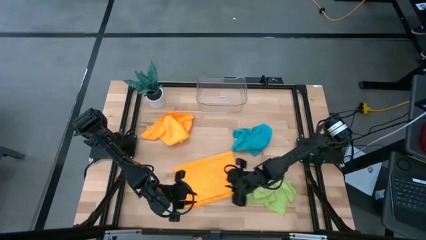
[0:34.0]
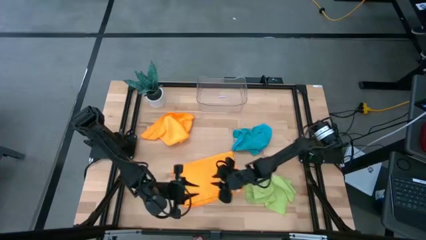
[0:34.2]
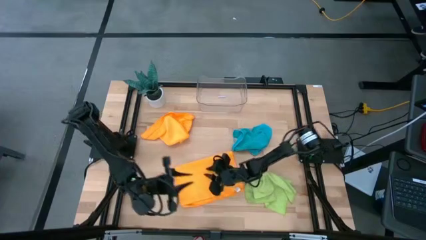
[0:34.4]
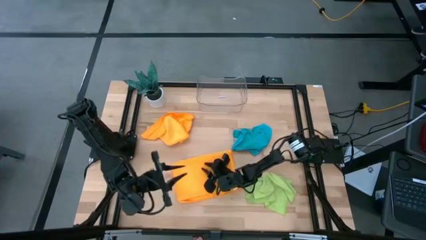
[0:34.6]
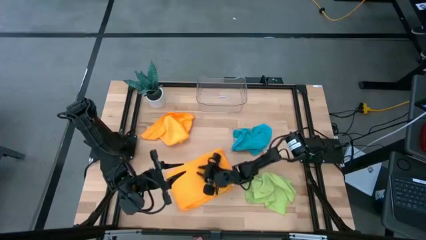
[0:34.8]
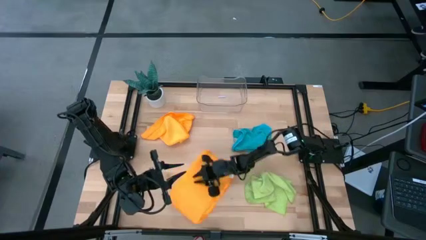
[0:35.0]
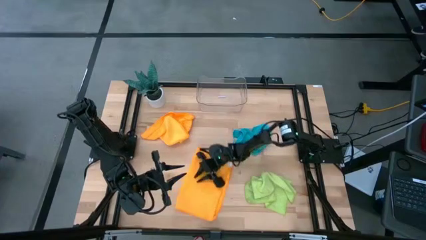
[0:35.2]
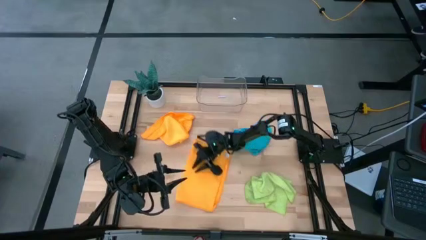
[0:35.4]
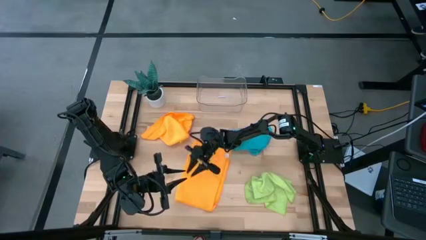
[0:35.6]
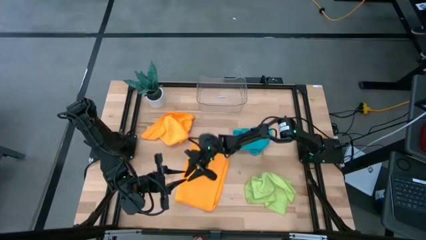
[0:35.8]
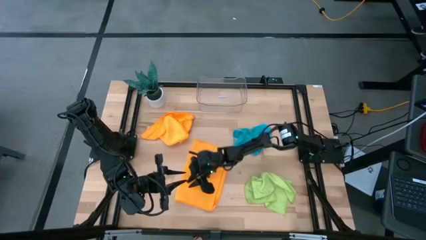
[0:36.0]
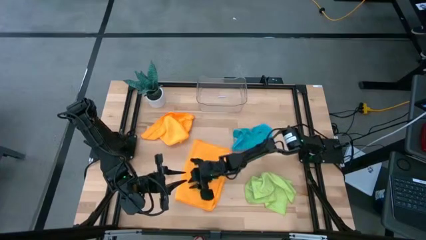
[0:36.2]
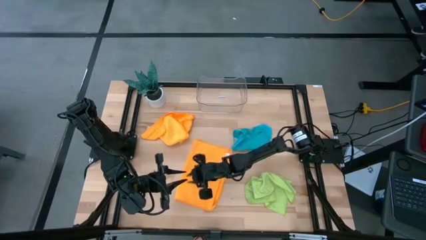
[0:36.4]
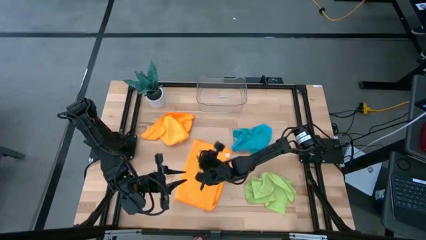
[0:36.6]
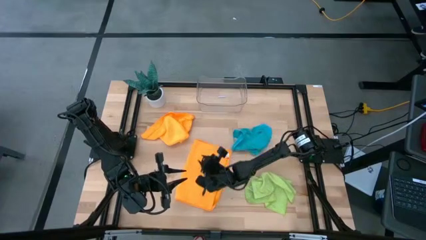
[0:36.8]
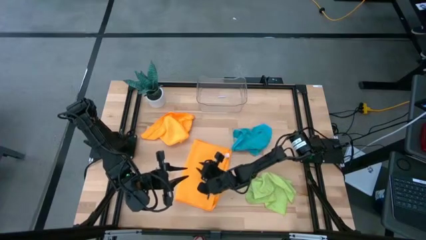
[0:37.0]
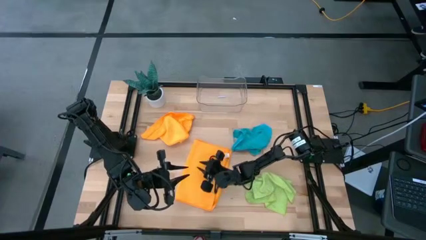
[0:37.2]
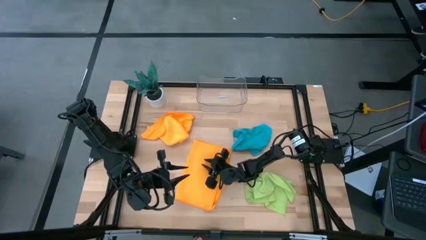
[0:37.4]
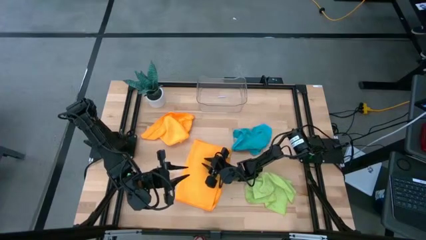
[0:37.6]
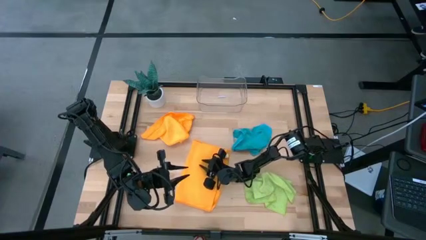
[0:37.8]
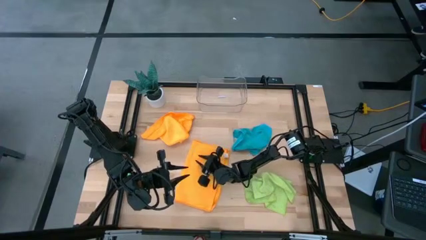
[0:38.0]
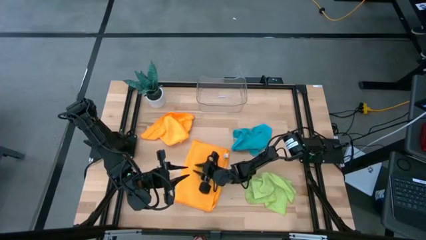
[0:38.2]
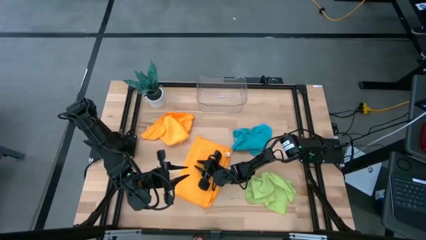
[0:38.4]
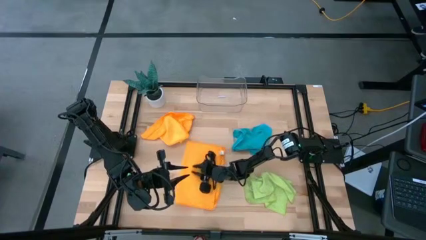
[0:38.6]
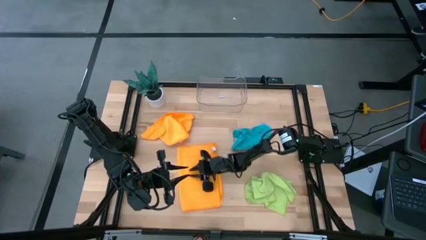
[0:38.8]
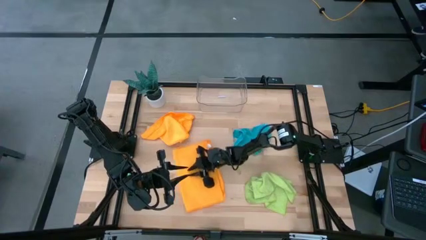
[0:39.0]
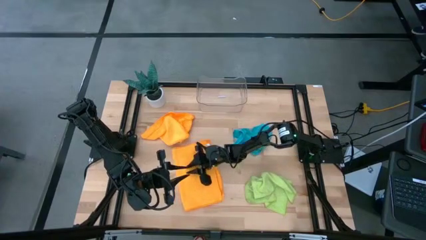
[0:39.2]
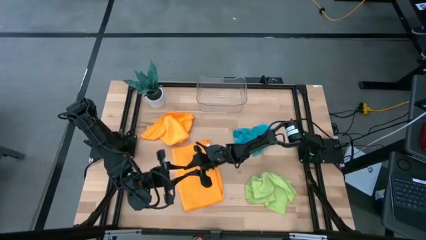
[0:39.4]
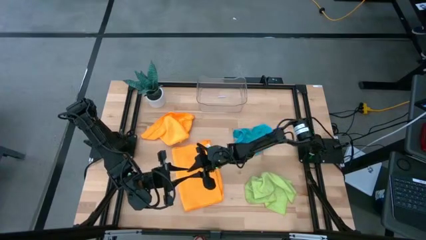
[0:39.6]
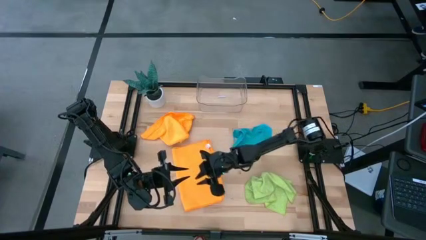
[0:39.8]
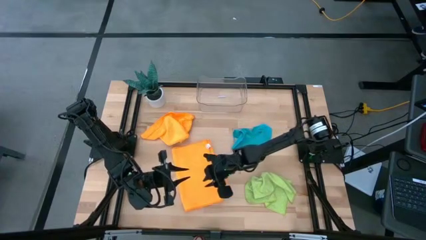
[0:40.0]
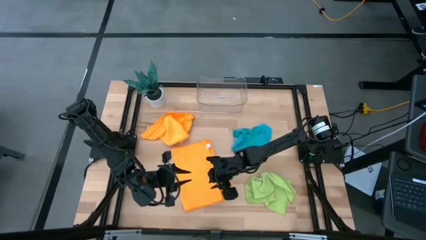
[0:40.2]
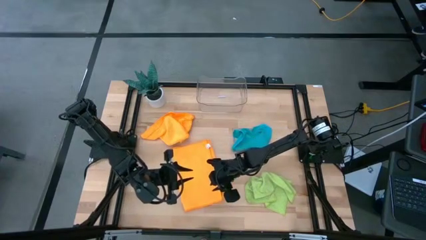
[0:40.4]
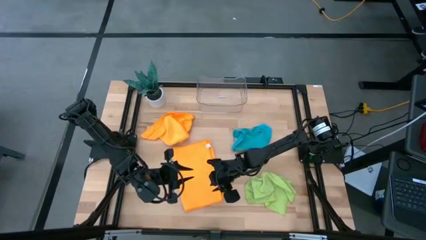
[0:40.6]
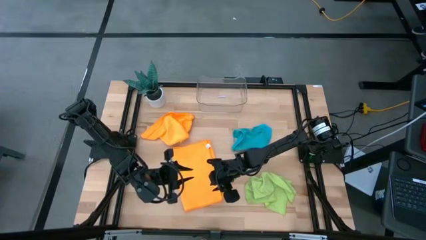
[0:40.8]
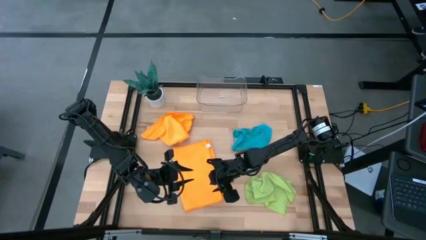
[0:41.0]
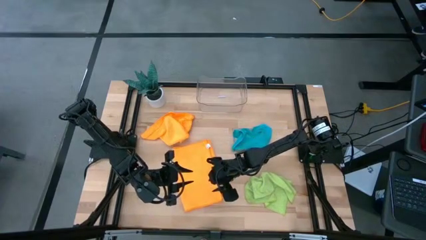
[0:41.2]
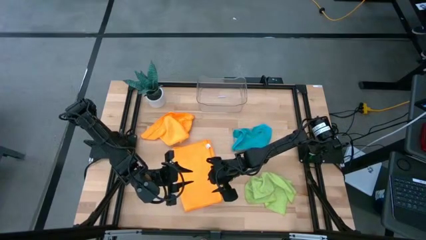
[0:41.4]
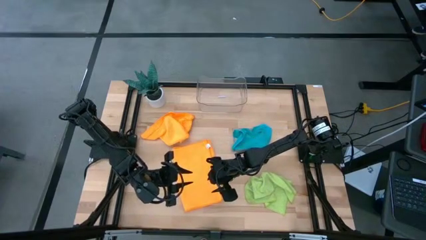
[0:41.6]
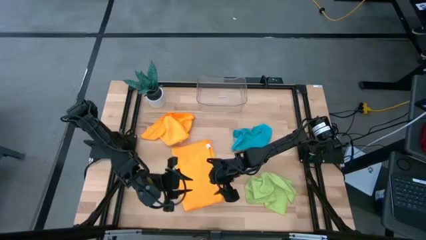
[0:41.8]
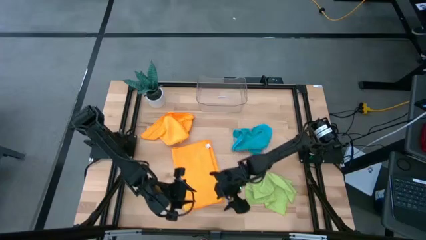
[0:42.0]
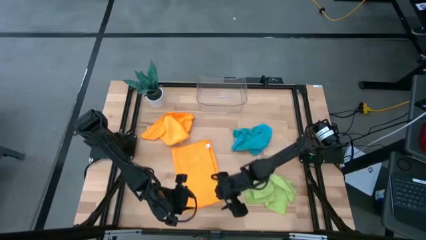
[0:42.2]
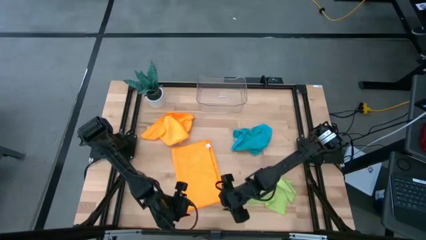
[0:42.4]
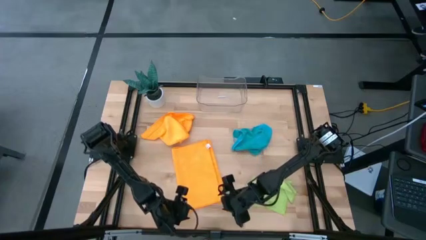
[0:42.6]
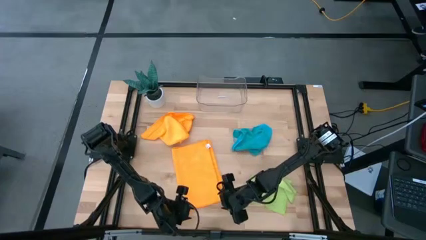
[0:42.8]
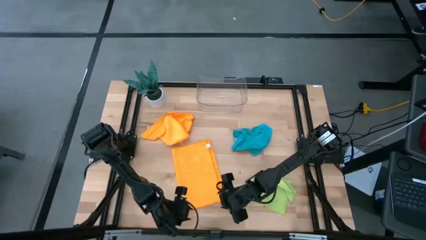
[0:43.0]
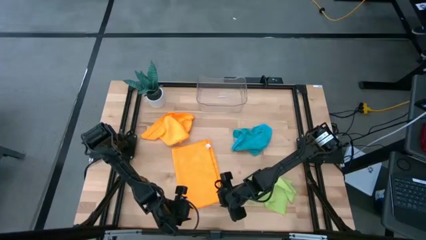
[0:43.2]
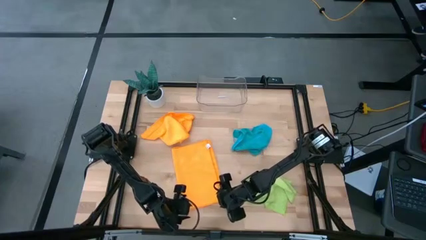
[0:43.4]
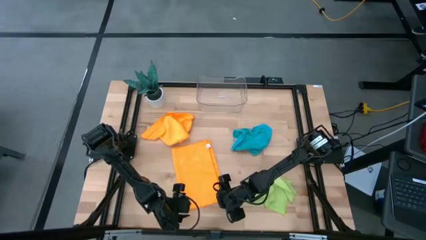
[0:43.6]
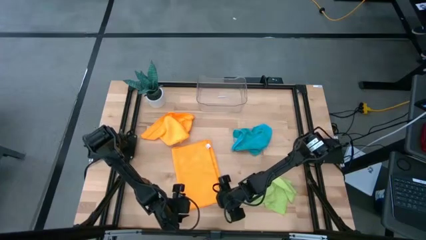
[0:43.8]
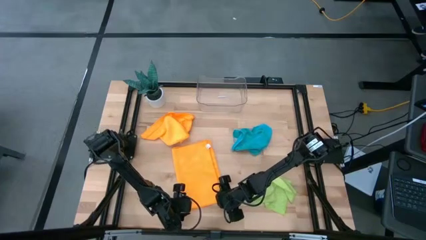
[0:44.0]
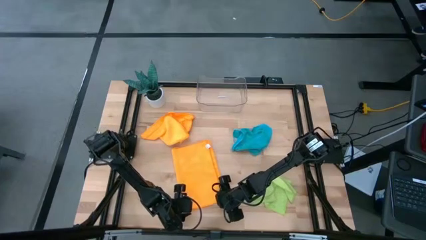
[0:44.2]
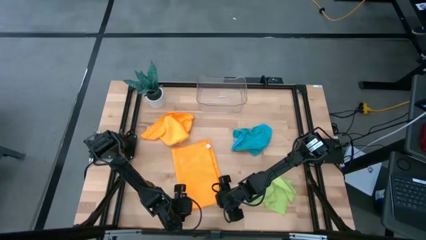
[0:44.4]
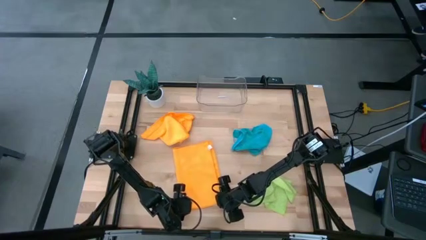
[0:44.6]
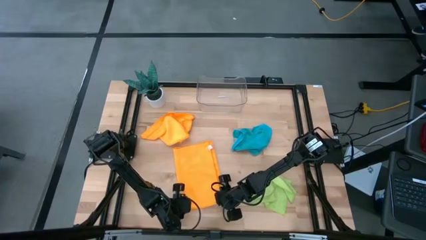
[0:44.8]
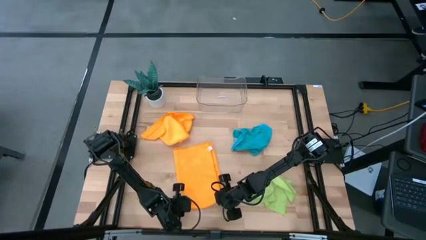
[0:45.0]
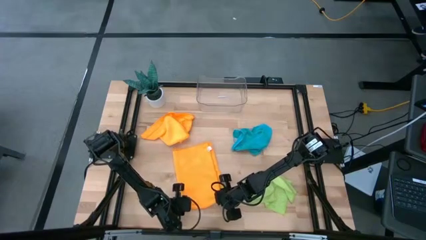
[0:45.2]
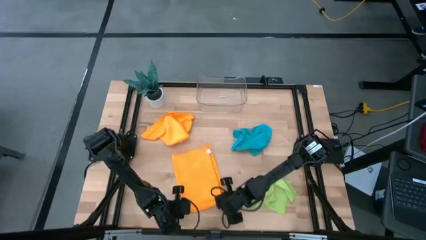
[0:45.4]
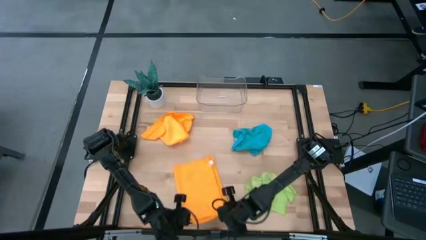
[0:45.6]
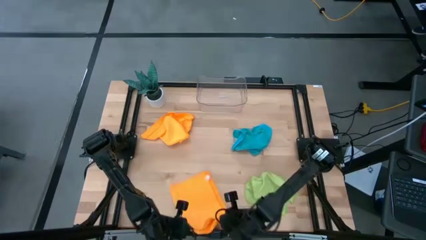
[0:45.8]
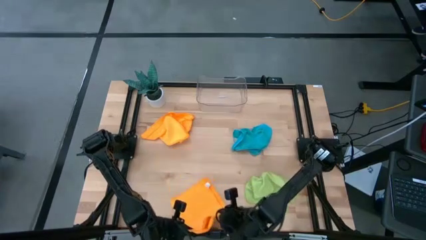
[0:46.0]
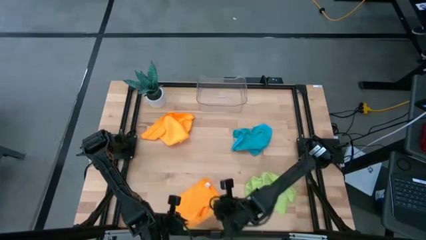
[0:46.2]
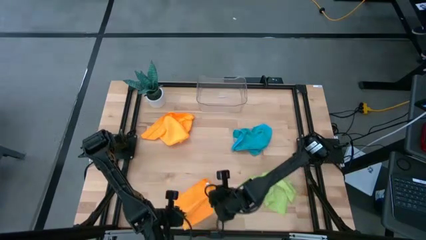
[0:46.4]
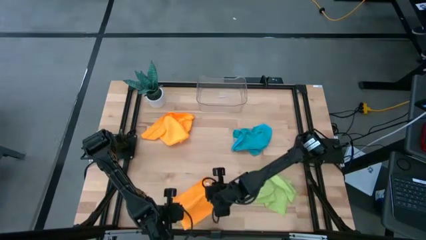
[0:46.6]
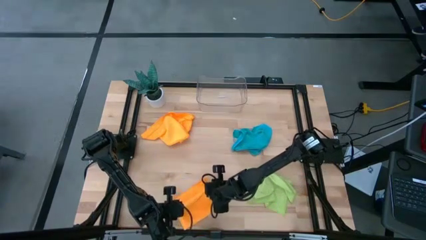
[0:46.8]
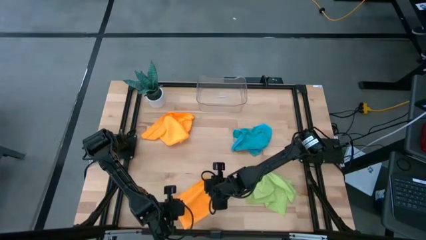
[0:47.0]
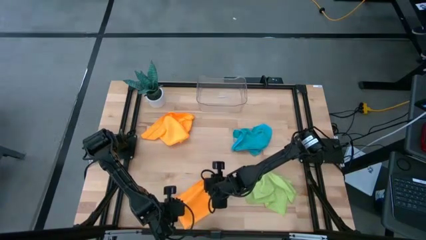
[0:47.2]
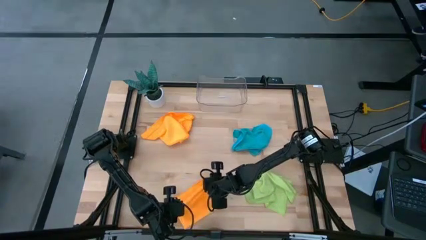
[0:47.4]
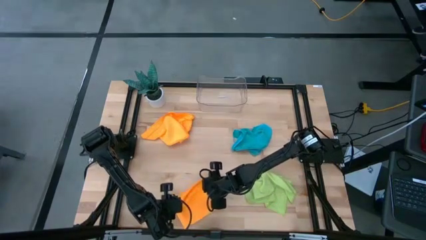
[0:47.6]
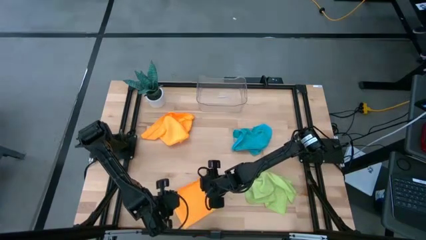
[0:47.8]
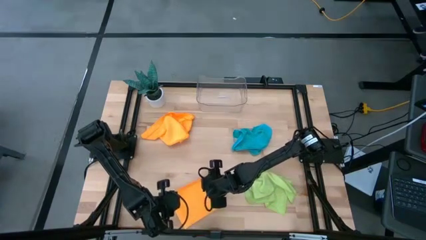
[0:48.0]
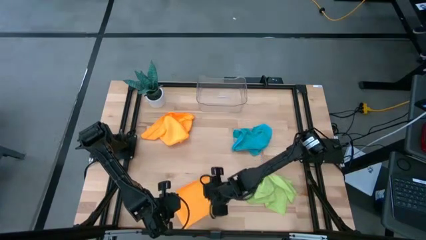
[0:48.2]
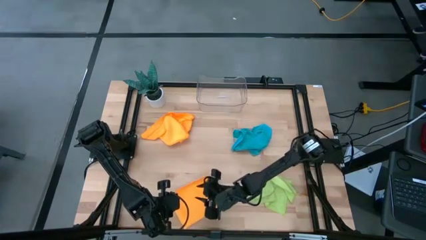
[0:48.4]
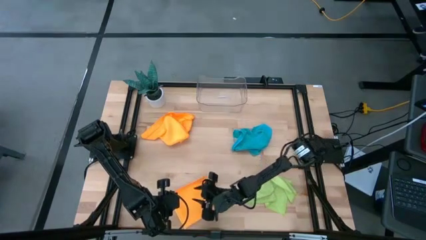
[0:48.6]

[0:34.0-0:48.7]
Task: Fold microfiber towels
Fold the bottom orange microfiber towel
